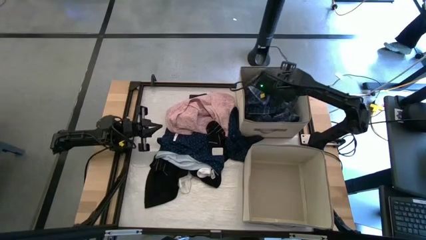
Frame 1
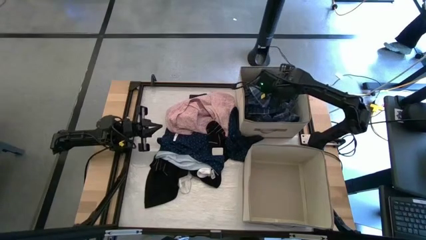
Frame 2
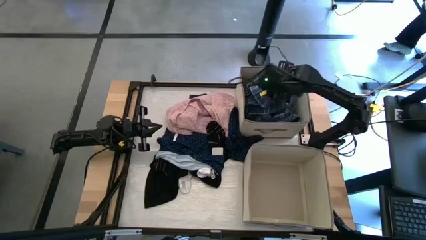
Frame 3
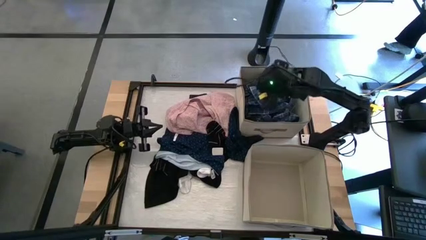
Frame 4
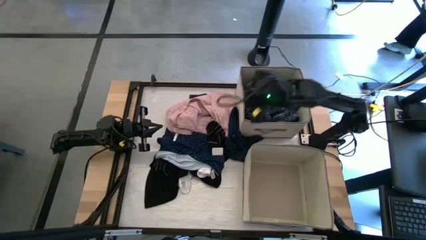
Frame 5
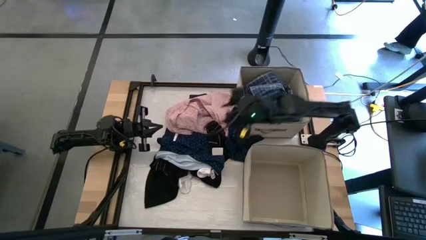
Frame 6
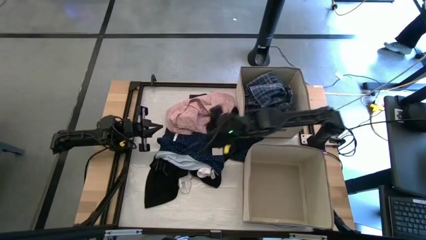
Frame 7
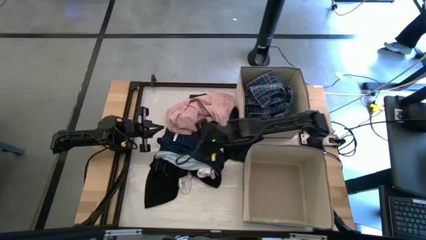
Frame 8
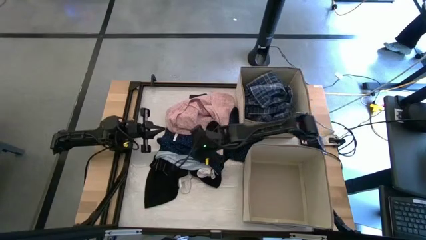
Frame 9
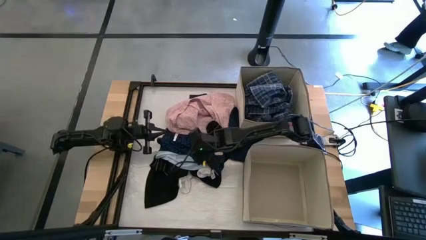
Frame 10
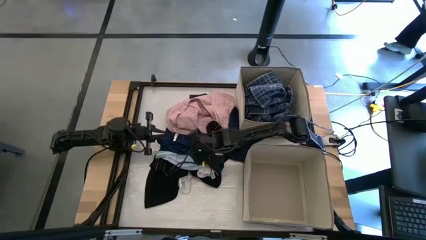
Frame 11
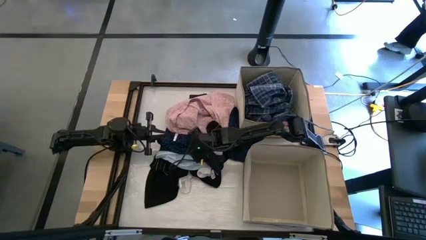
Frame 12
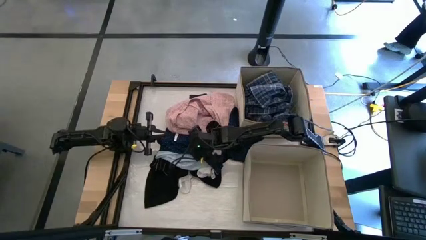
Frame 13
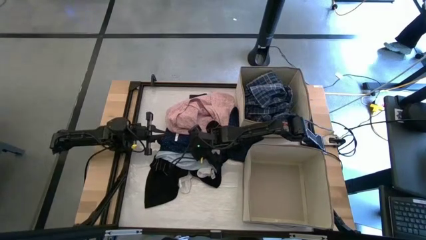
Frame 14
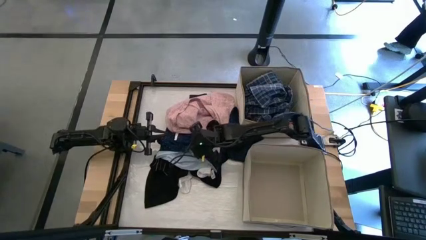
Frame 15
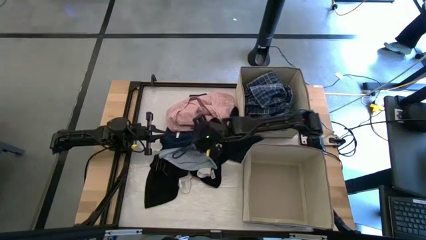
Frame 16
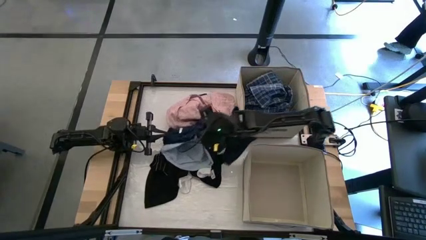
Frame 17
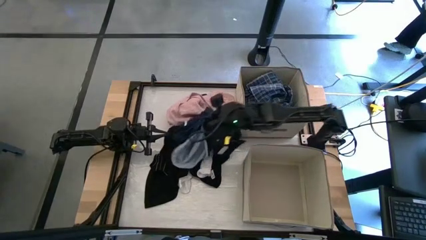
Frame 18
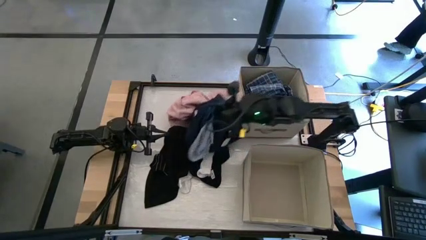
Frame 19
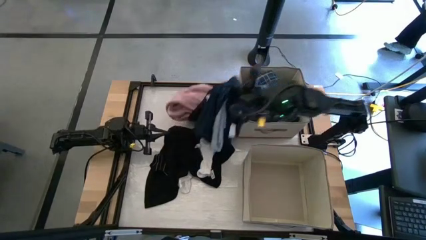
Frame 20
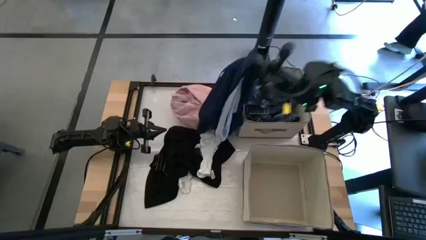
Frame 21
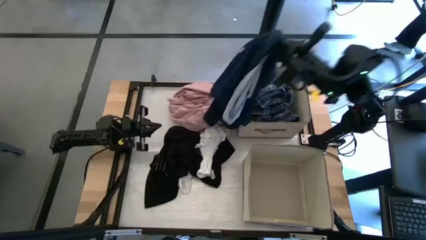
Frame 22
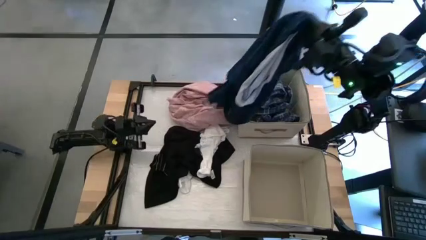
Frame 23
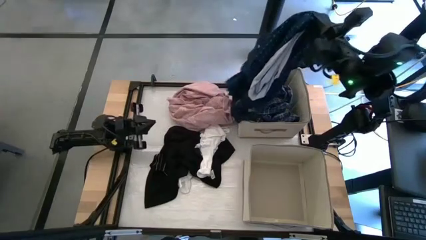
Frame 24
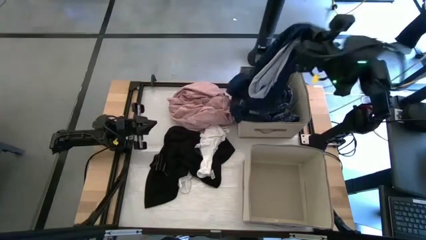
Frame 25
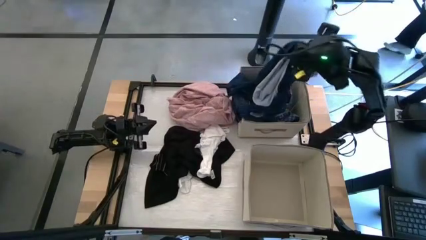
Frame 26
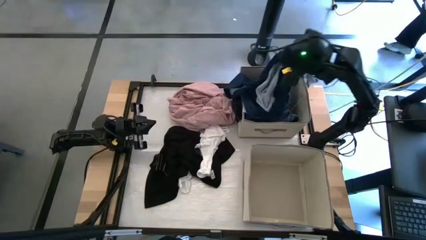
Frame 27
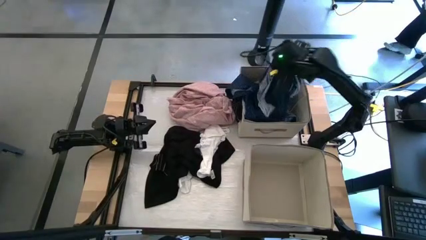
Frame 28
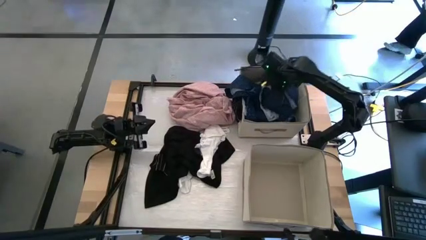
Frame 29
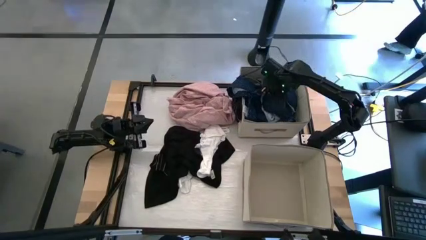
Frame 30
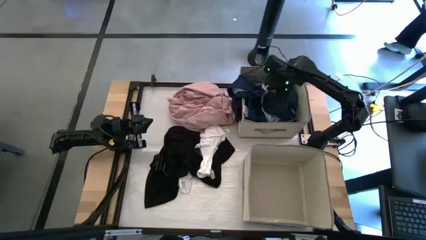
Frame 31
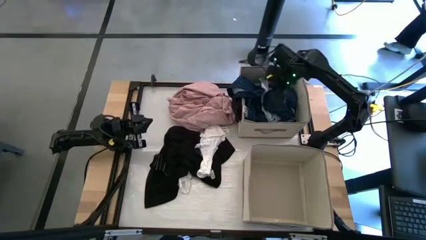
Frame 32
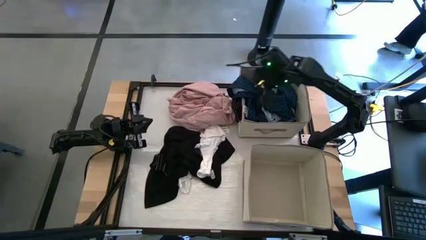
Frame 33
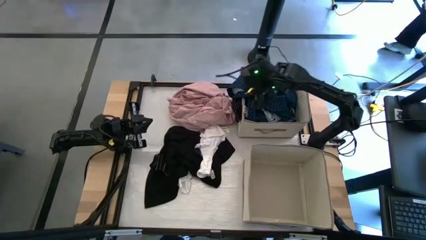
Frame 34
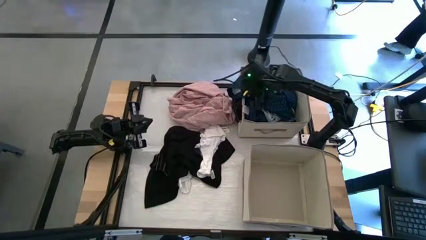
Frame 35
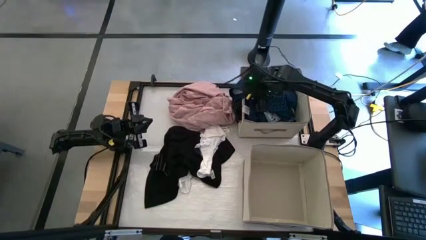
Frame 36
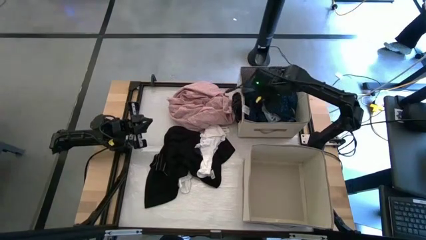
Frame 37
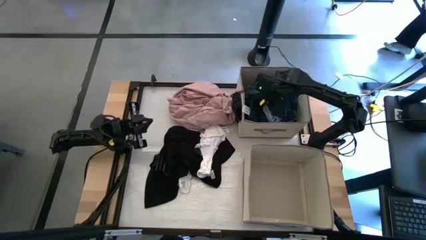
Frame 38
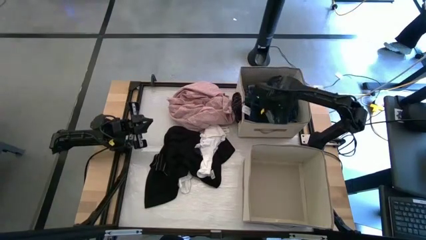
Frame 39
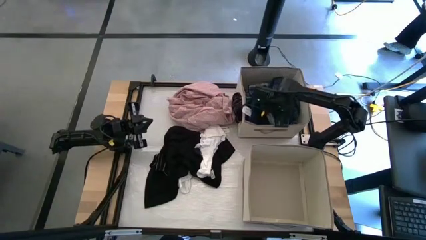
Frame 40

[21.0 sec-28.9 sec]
Task: Sort clothes
Put the dark blue polo shirt into the top laundry organizer

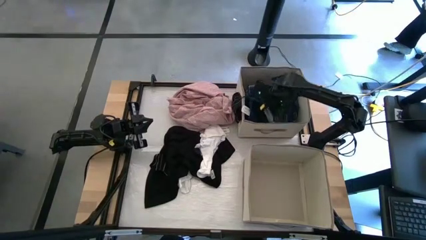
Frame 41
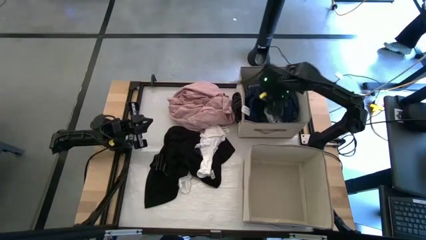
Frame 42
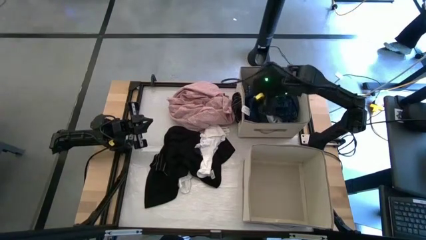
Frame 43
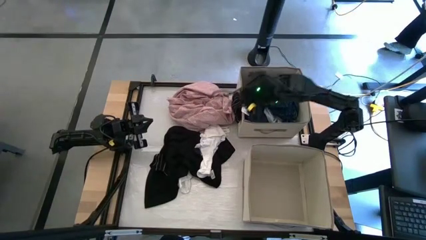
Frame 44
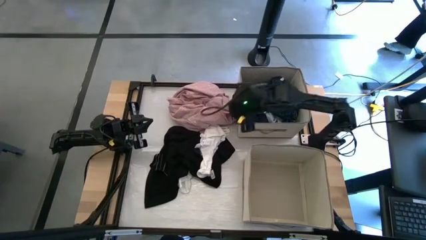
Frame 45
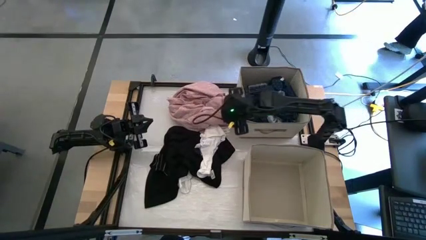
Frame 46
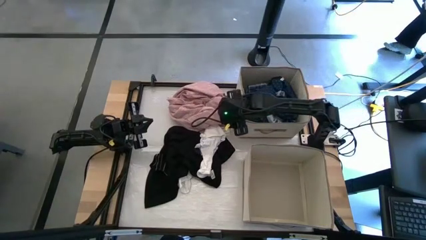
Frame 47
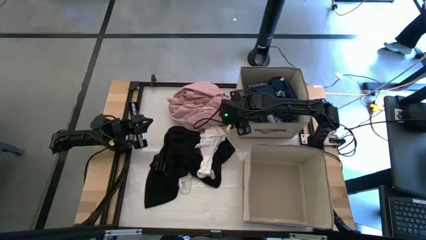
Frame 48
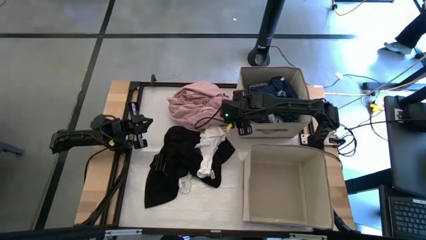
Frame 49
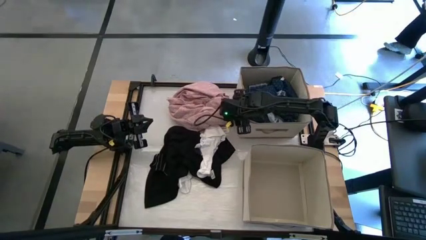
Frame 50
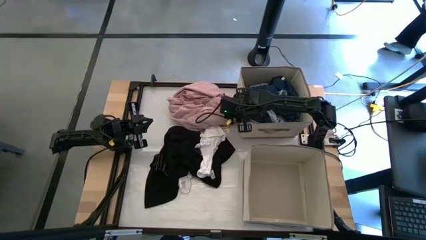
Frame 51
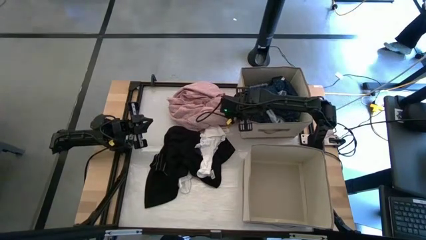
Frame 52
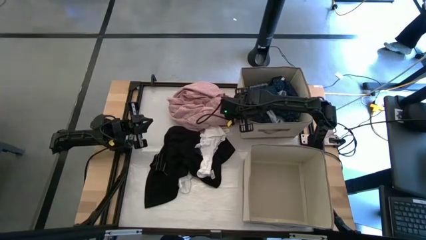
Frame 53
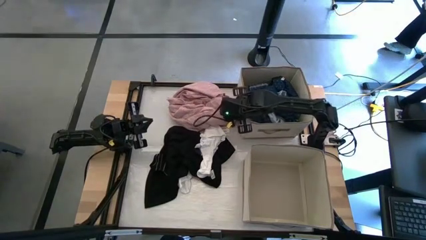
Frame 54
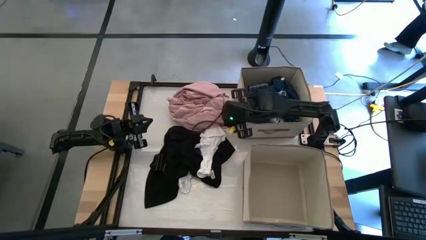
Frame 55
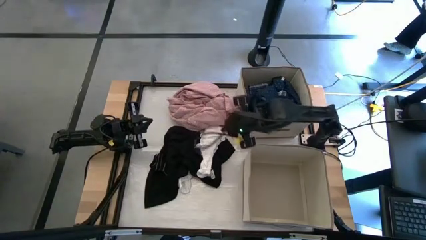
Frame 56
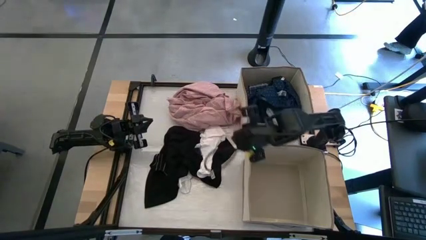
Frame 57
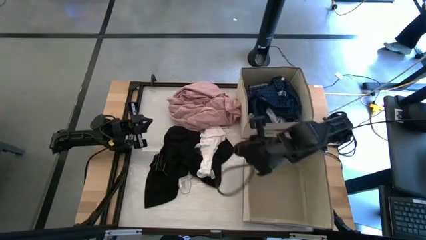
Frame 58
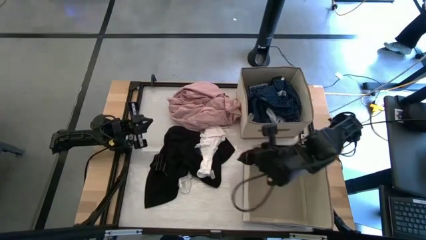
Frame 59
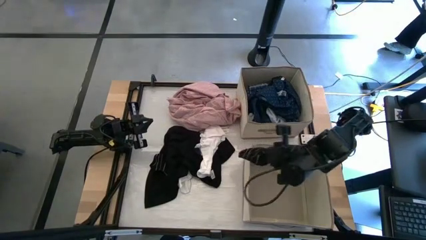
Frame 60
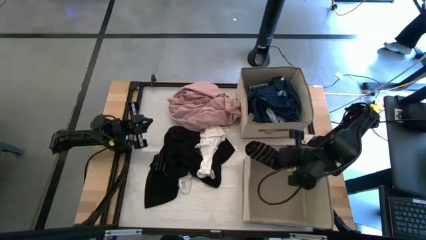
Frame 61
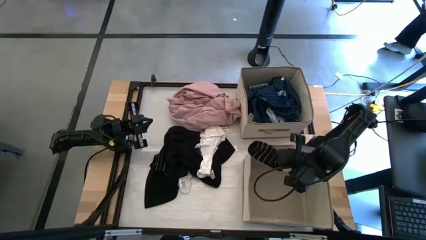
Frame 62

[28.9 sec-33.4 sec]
Put the black striped sock into the bottom laundry organizer

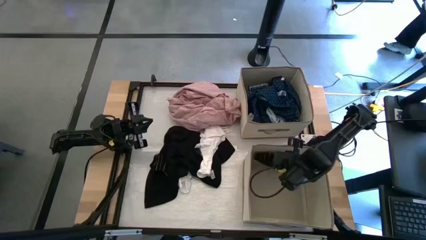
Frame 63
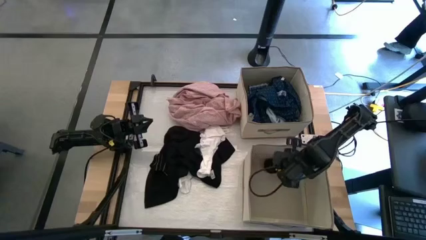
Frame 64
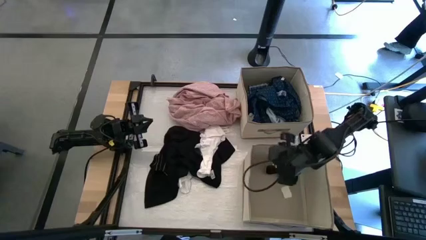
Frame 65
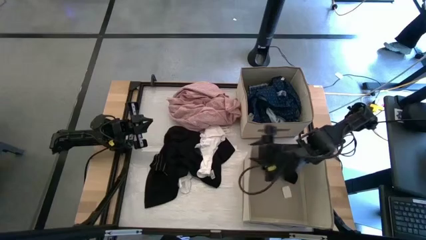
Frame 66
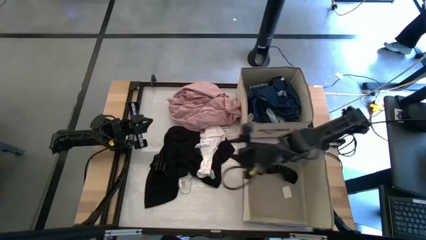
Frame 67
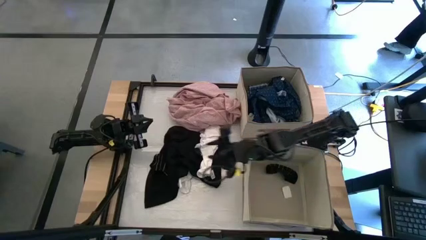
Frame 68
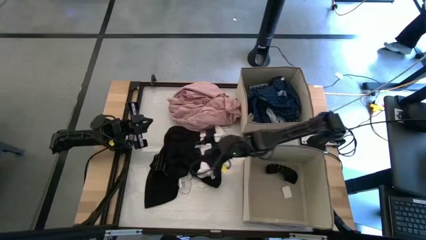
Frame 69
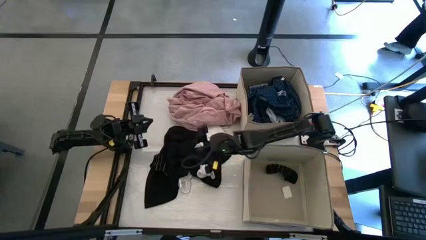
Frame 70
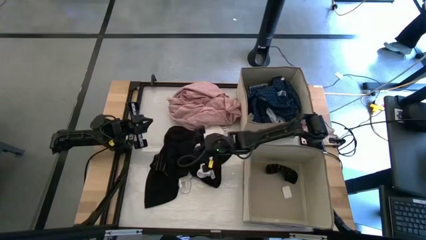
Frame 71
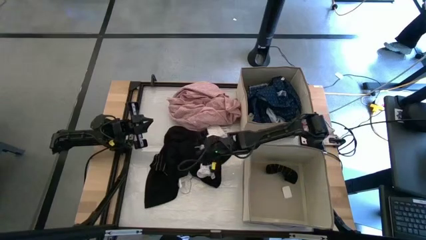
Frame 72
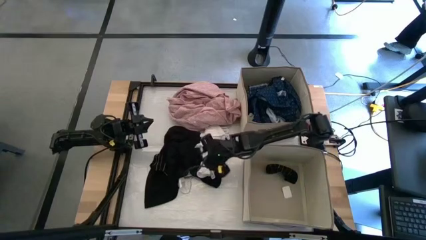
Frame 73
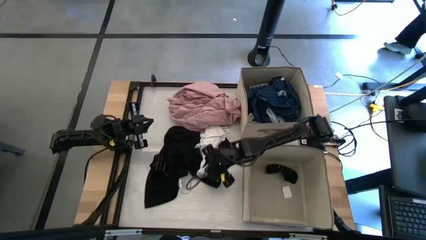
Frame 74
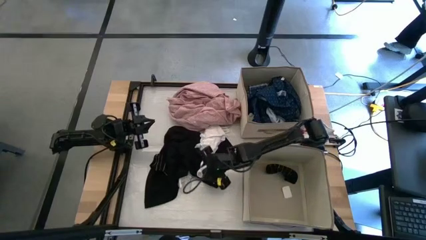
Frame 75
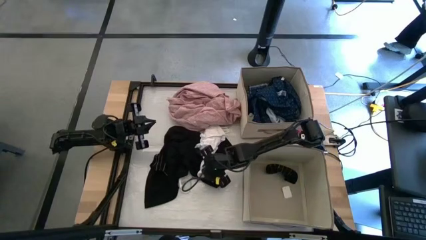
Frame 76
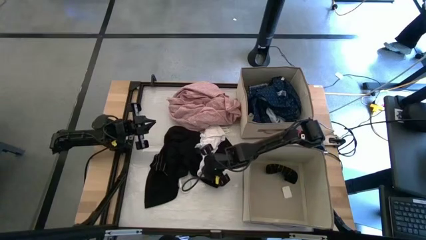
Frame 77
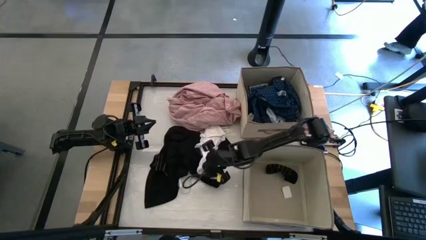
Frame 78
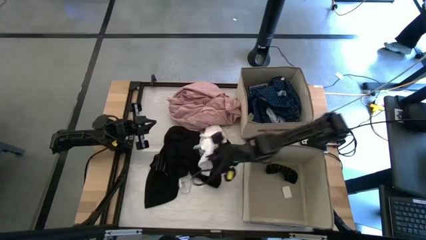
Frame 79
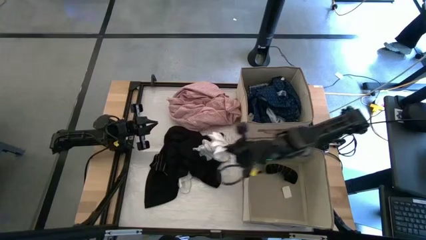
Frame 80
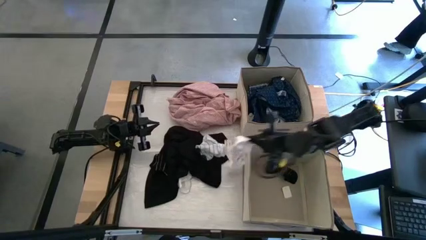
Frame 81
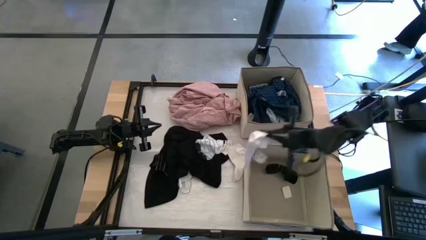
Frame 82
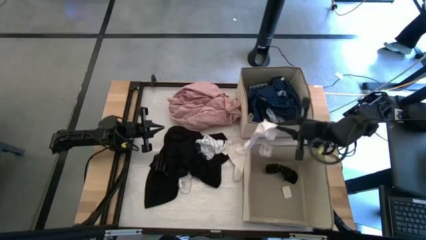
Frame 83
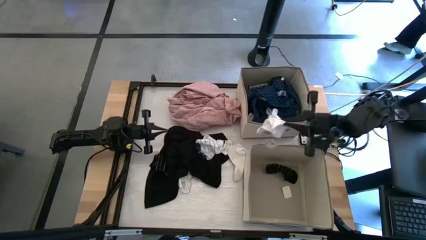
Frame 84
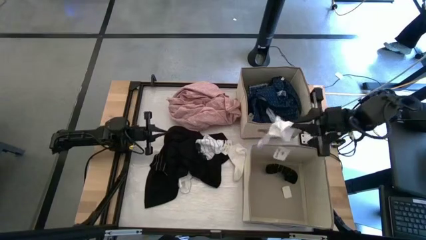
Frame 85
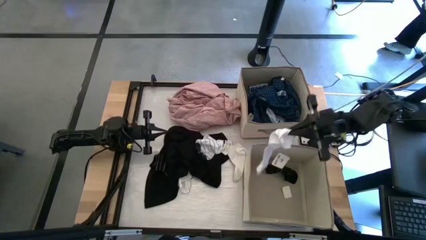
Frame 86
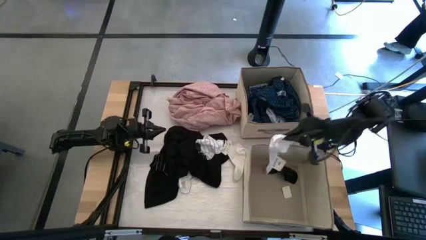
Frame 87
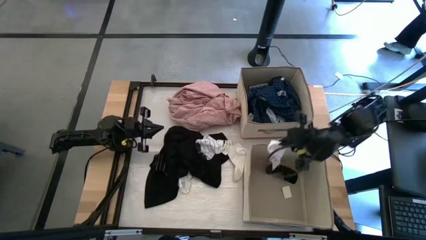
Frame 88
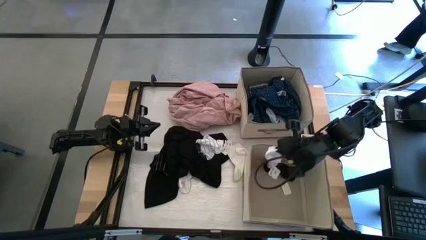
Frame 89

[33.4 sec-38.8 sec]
Put the white sock into the bottom laundry organizer
